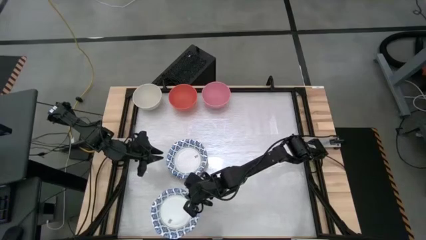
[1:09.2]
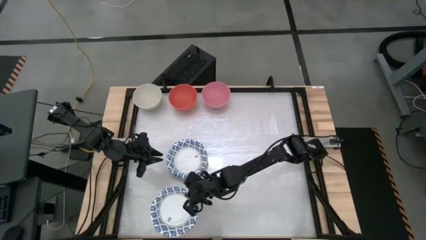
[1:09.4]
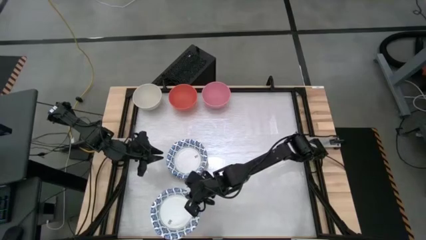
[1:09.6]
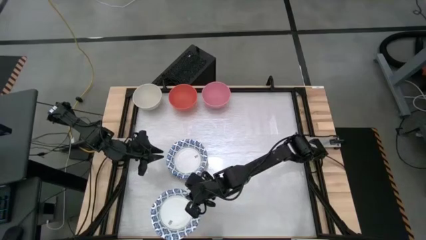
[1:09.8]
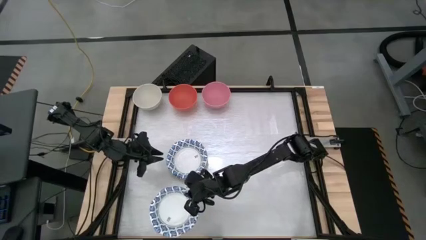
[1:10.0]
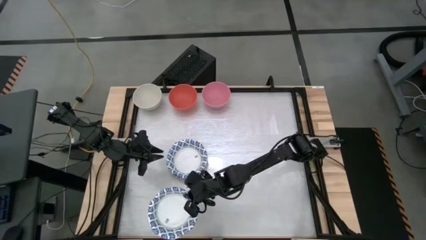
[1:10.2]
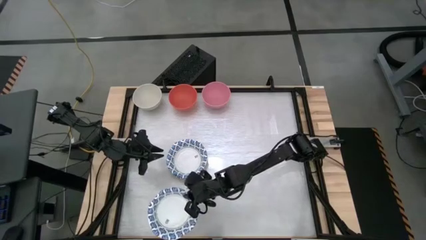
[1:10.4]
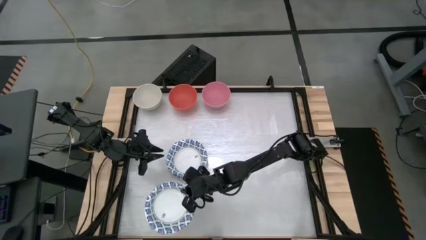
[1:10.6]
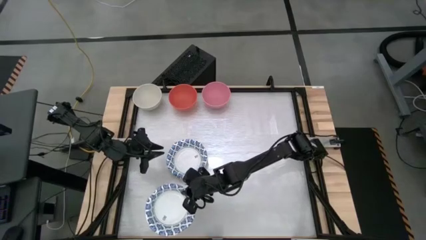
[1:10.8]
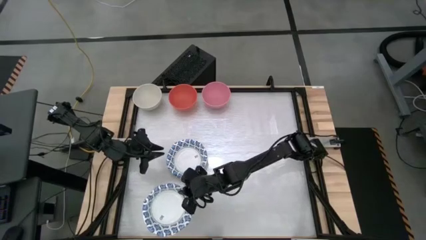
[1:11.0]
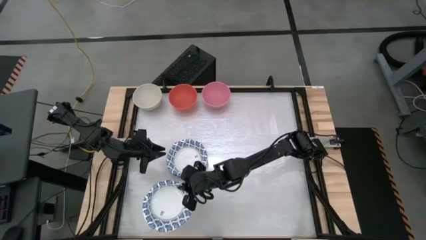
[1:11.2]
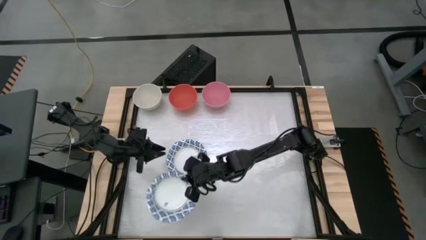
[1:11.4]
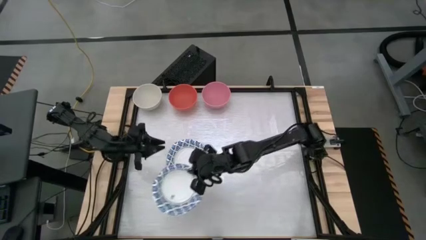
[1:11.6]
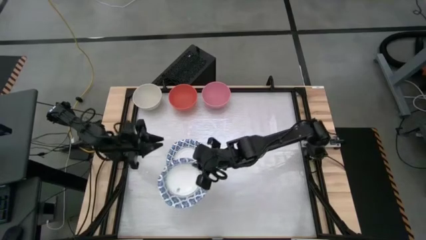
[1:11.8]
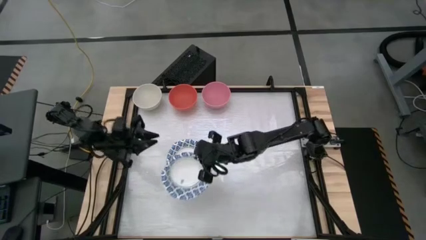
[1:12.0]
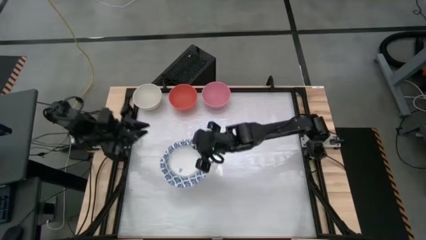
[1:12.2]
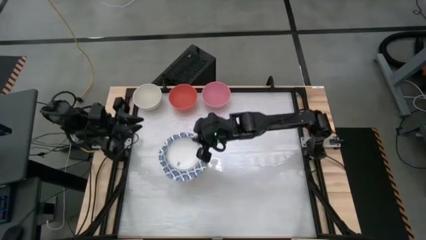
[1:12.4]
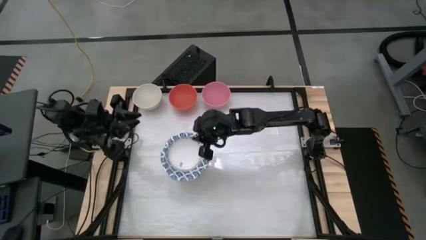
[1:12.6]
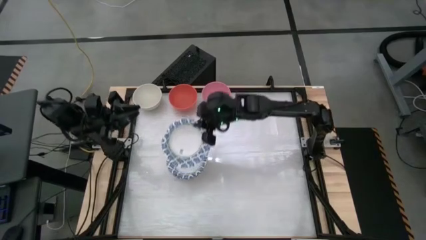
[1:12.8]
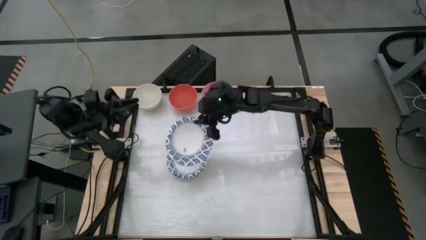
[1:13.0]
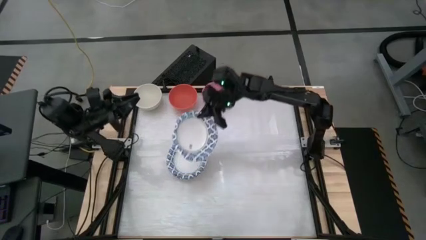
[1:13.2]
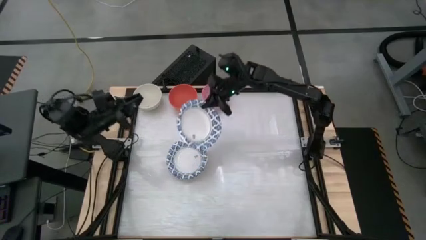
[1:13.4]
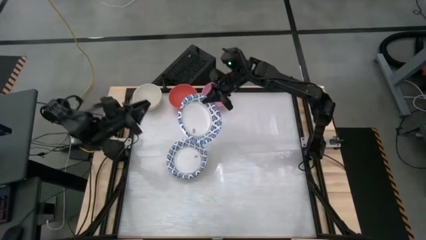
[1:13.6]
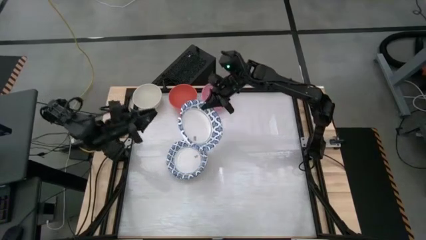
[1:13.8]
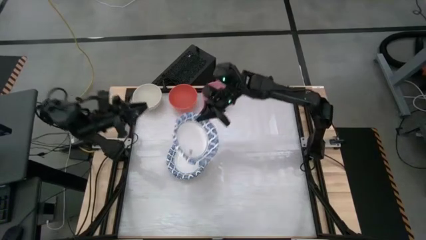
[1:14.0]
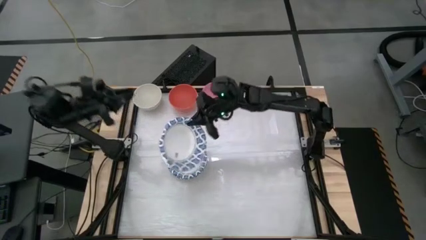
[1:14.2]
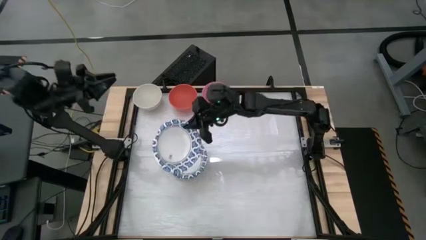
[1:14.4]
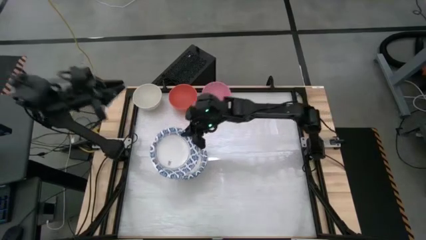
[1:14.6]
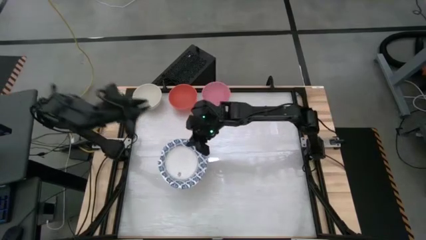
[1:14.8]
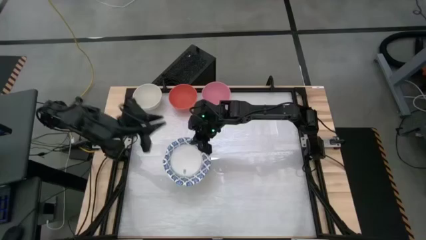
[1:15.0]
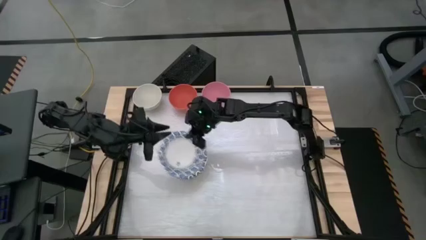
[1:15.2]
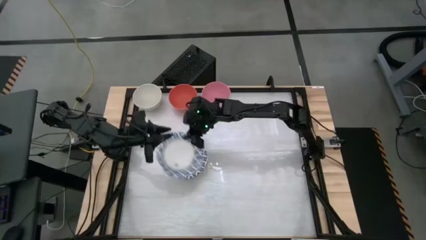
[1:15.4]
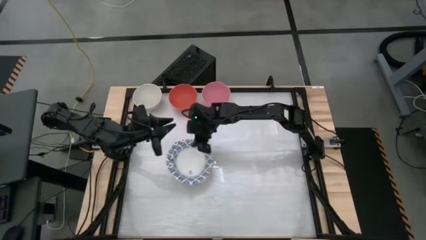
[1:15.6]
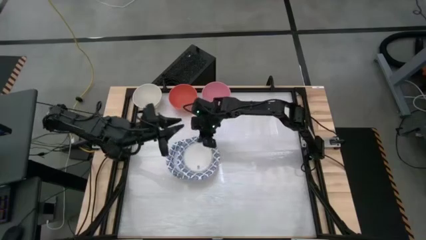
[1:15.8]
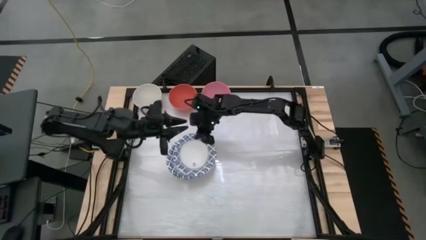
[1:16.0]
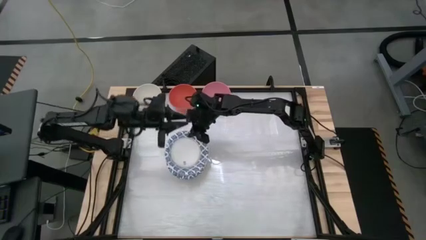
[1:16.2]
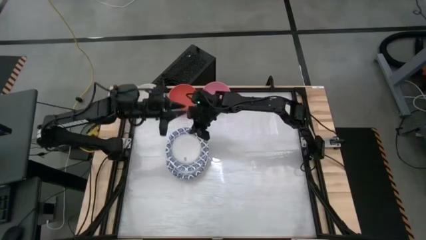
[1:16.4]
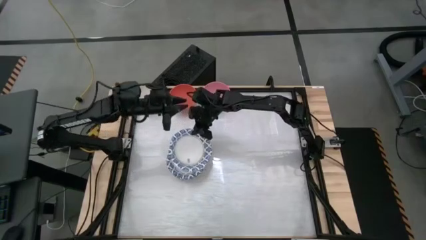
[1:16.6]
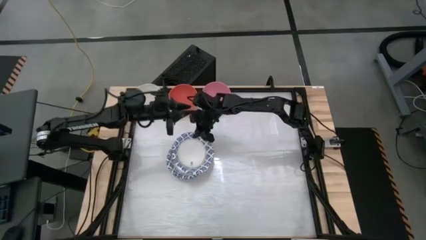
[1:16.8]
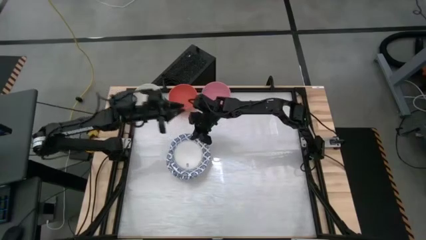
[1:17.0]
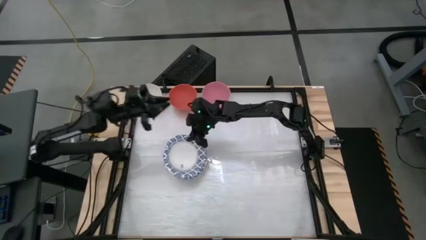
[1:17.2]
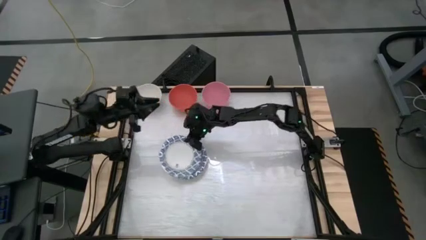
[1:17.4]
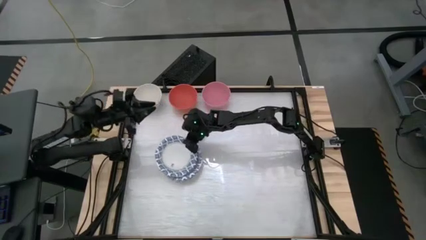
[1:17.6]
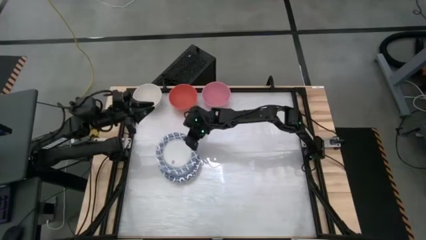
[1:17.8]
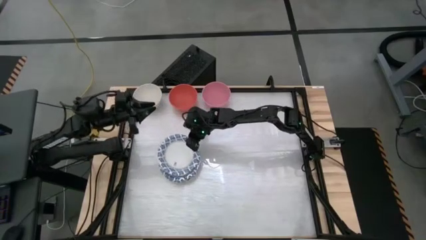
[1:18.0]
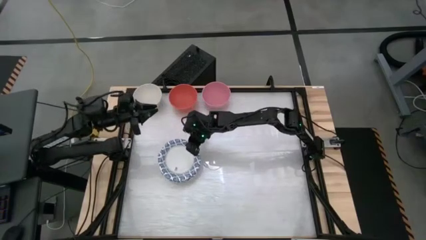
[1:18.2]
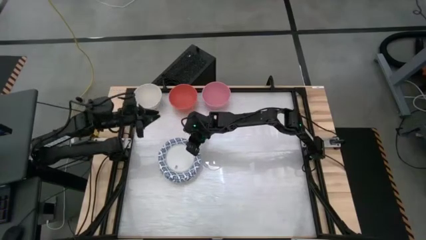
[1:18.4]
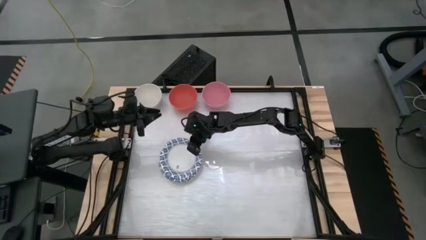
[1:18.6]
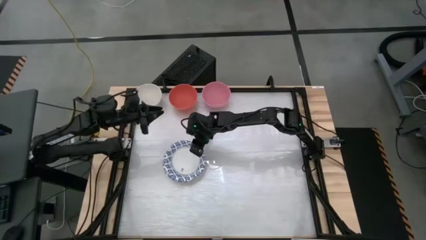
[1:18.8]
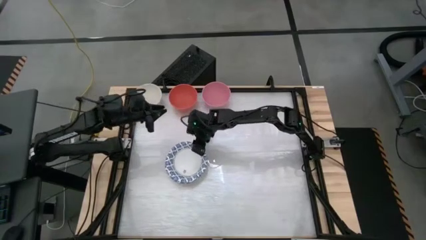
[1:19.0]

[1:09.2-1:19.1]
Task: Nest bowls inside each other by size order
Stack the white patterned bowl on top of the white patterned bowl

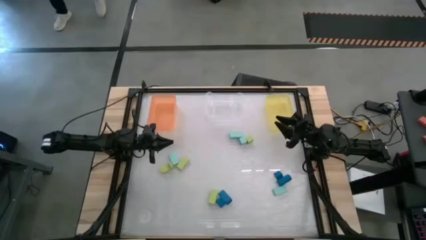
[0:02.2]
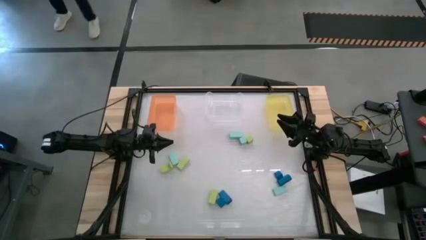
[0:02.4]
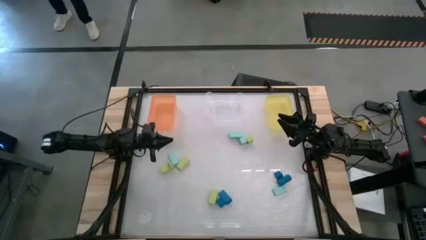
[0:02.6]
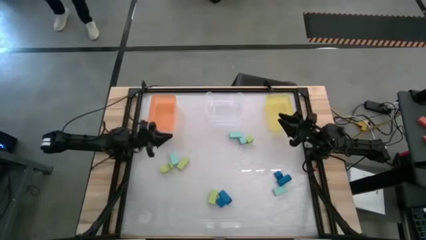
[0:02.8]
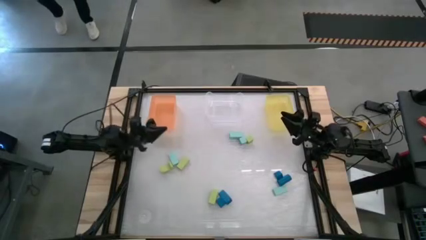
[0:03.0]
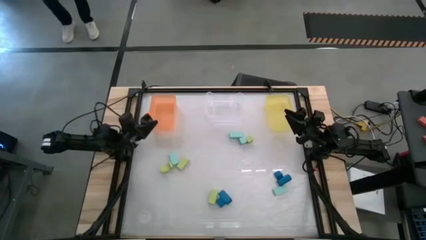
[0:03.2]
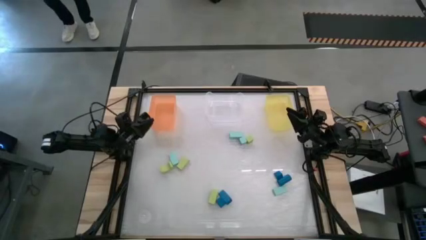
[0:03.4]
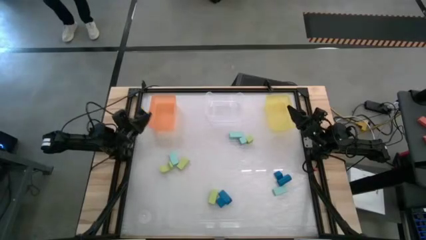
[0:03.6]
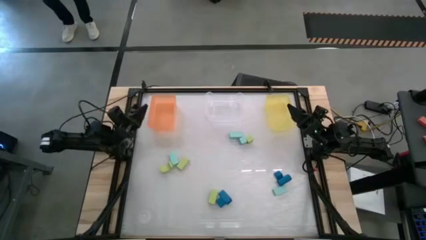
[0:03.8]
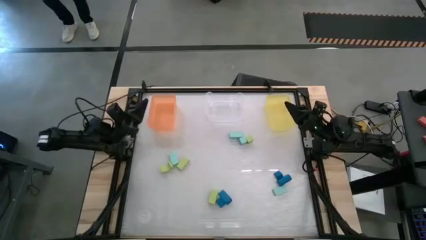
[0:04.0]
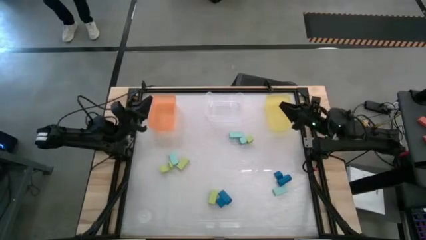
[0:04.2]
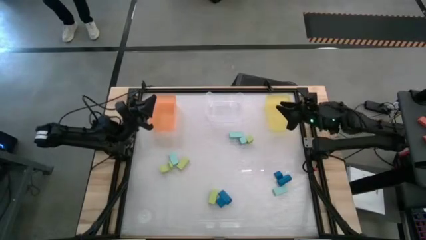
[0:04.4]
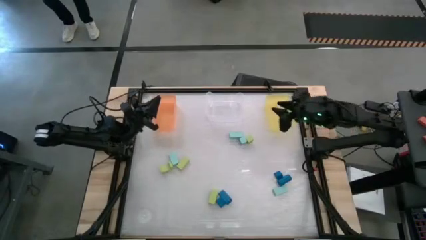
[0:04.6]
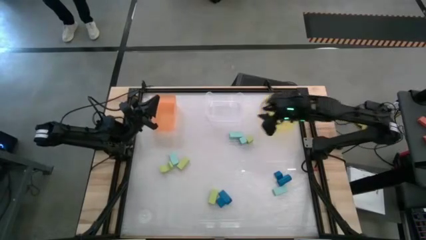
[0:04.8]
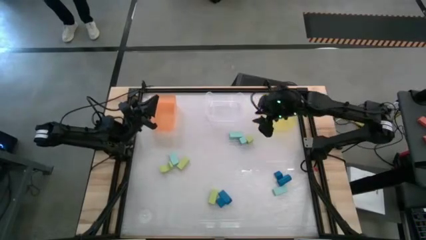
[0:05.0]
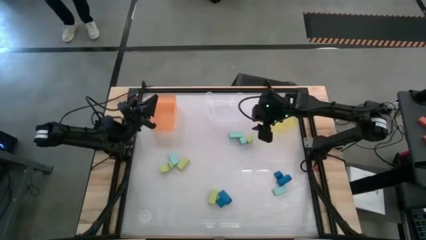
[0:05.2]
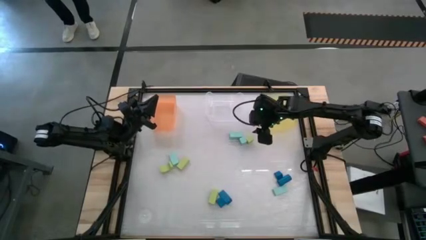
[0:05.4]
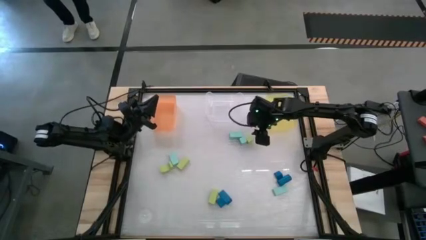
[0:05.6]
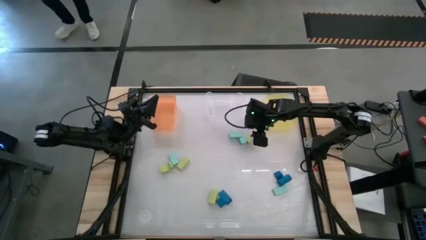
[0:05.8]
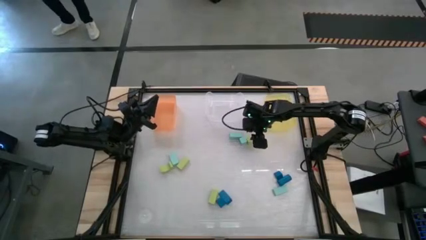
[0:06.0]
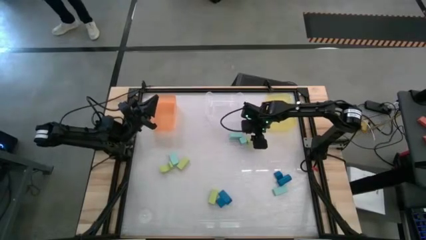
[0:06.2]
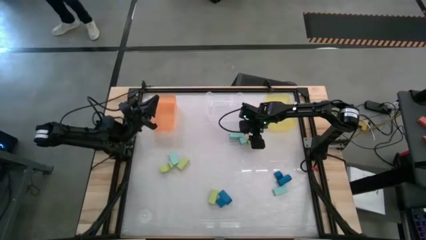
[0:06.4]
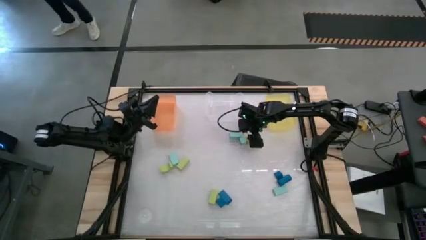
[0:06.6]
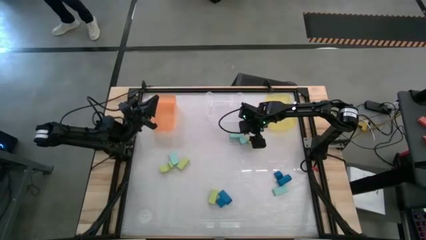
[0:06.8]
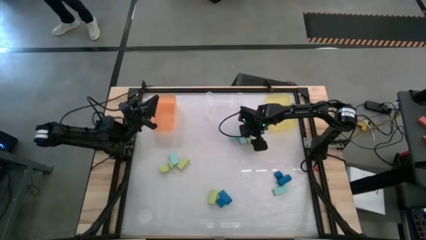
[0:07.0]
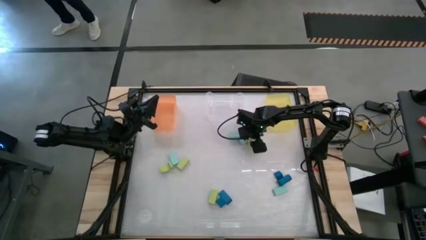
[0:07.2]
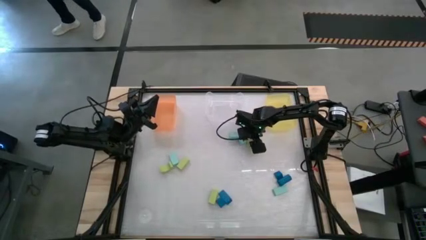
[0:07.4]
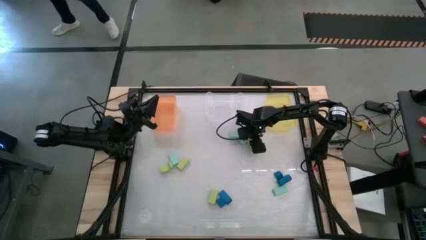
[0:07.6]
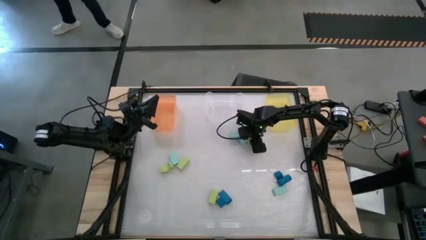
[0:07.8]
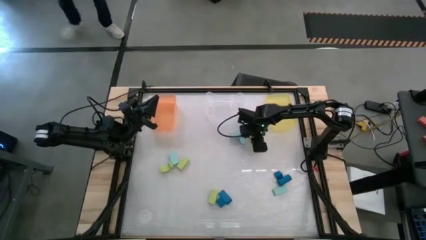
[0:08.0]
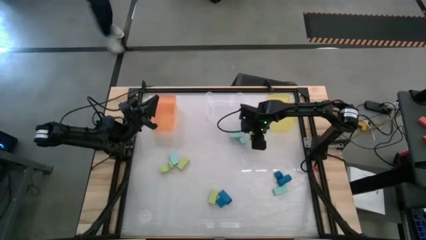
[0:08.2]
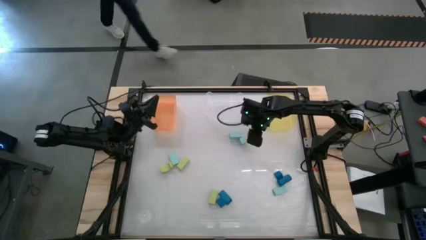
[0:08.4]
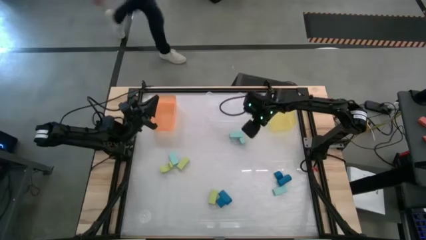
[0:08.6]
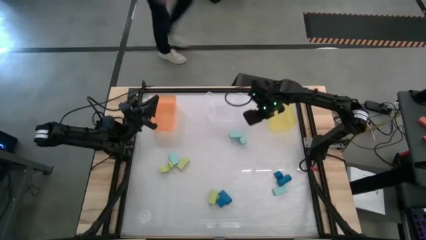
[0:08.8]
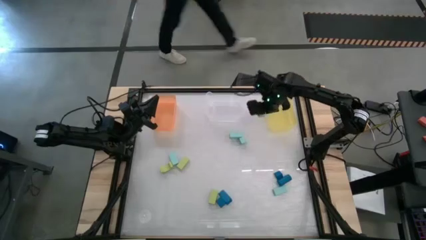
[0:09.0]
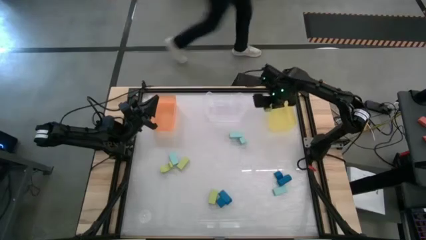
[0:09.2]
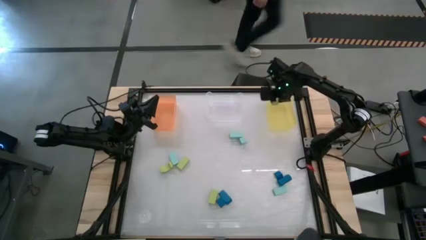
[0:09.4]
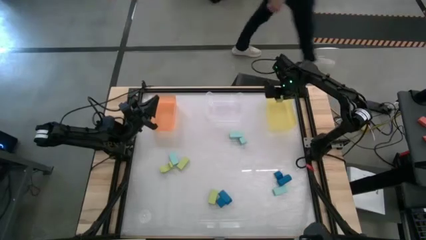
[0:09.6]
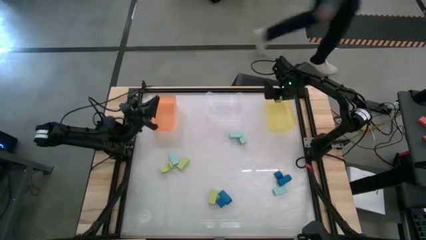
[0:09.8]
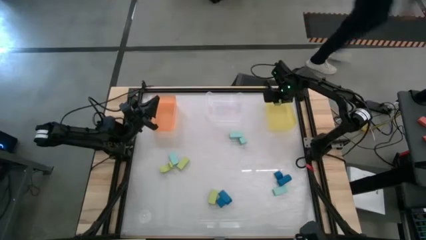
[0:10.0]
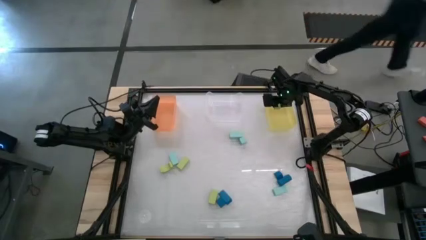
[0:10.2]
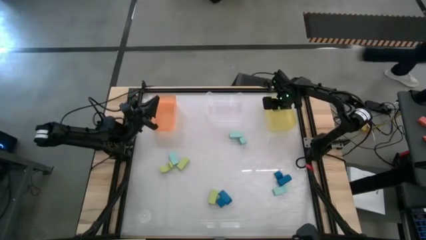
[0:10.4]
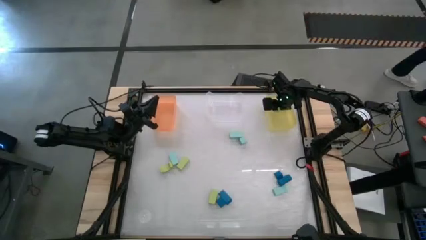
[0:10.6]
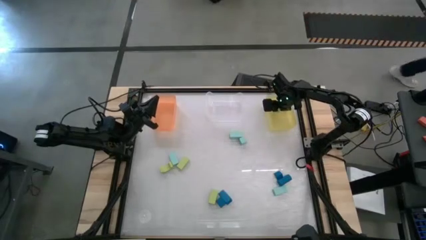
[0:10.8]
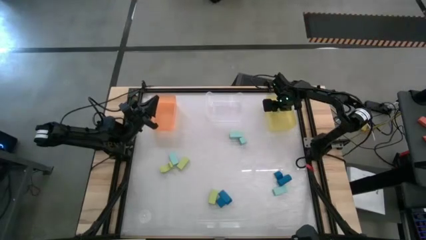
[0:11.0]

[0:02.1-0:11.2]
Task: Sort & place blocks by color
Put the green square block into the yellow bin
